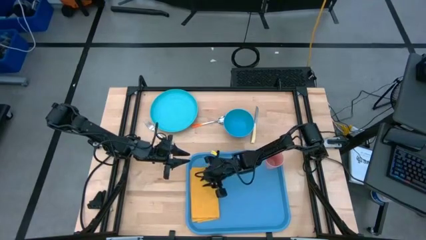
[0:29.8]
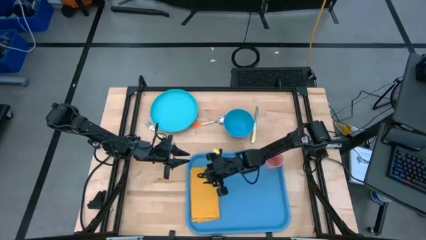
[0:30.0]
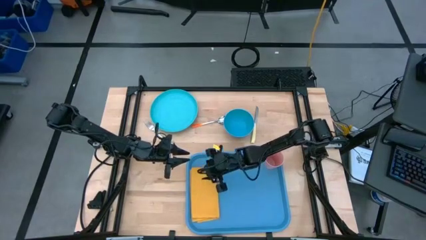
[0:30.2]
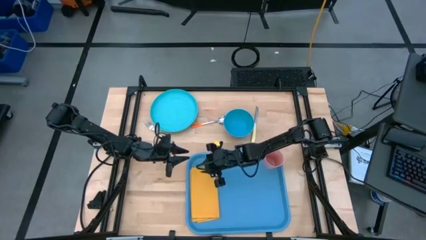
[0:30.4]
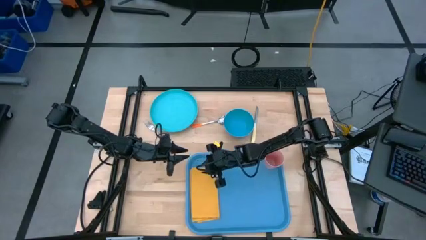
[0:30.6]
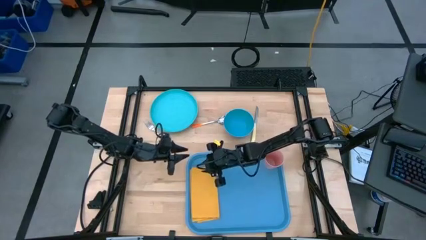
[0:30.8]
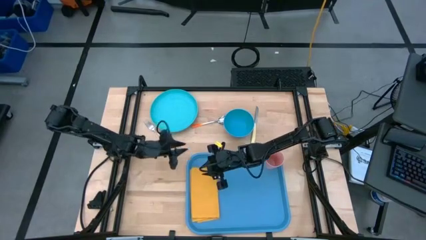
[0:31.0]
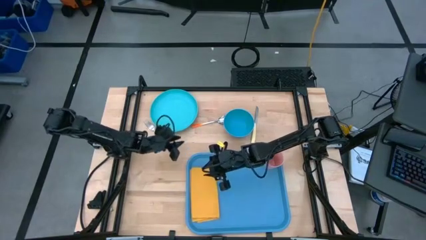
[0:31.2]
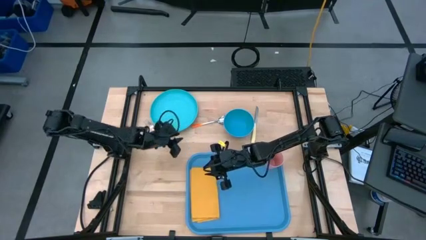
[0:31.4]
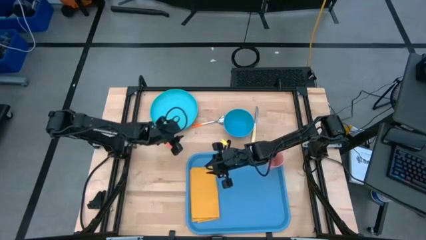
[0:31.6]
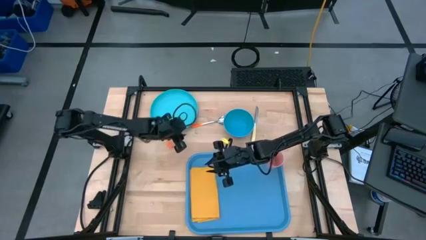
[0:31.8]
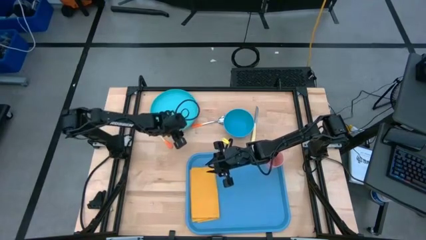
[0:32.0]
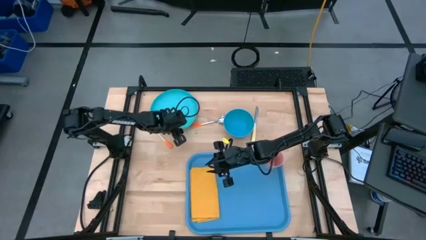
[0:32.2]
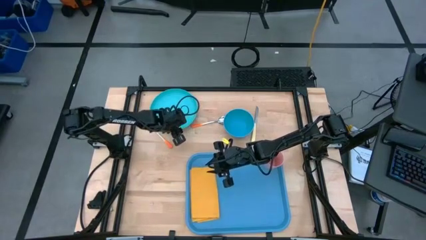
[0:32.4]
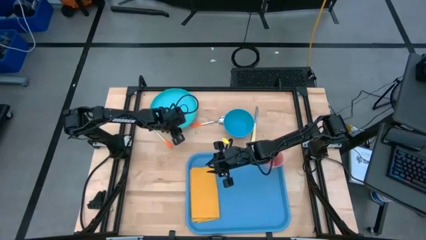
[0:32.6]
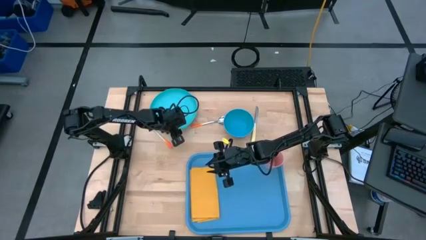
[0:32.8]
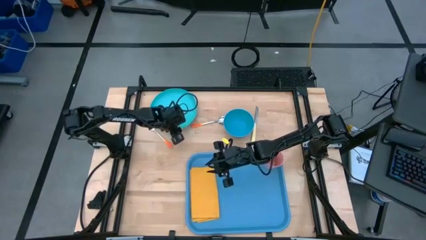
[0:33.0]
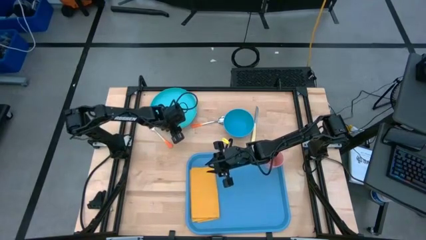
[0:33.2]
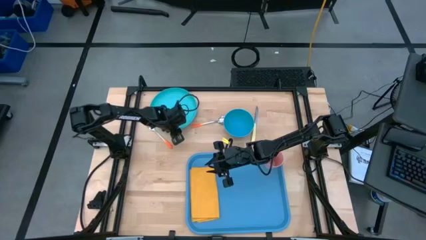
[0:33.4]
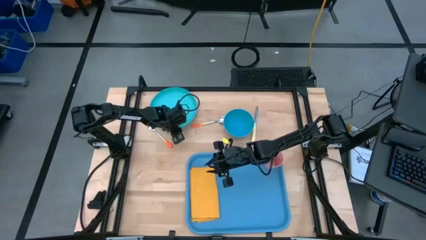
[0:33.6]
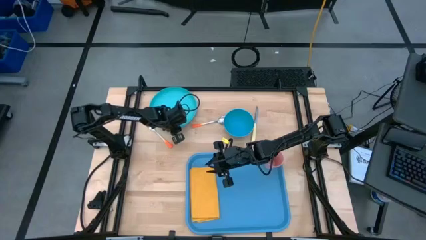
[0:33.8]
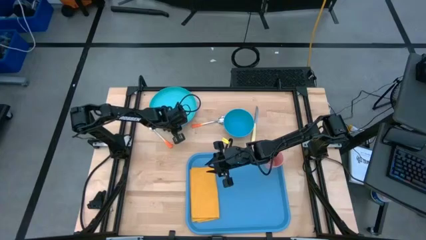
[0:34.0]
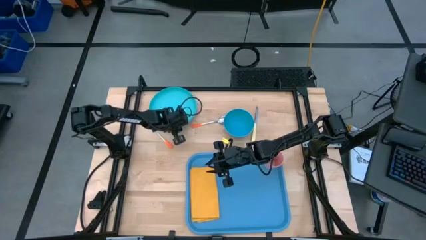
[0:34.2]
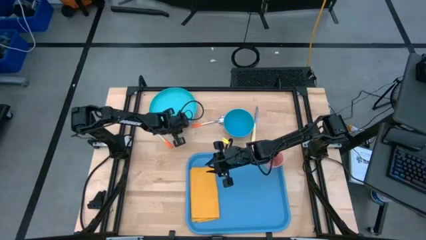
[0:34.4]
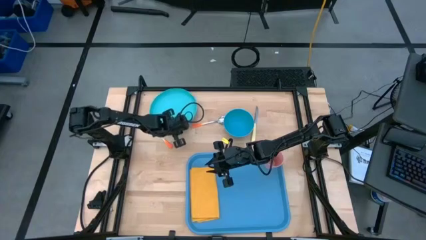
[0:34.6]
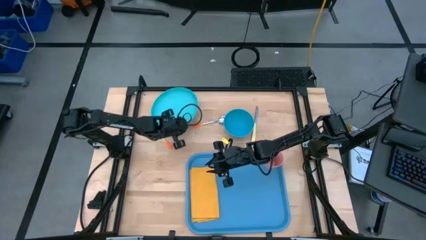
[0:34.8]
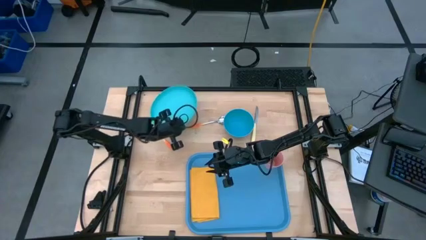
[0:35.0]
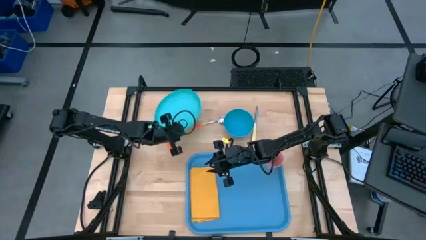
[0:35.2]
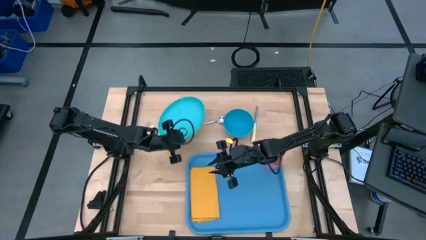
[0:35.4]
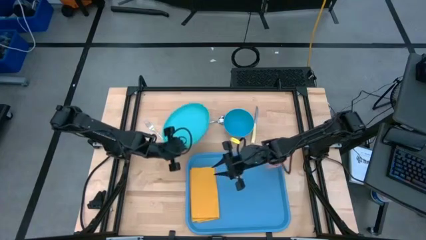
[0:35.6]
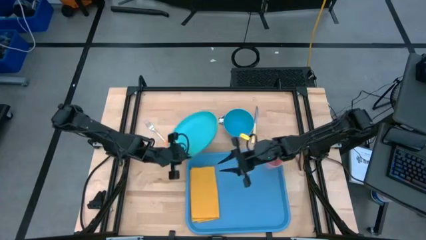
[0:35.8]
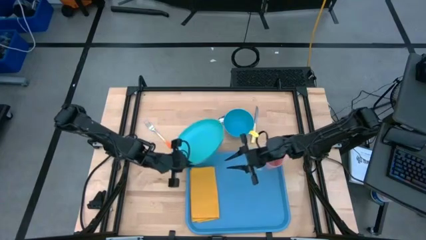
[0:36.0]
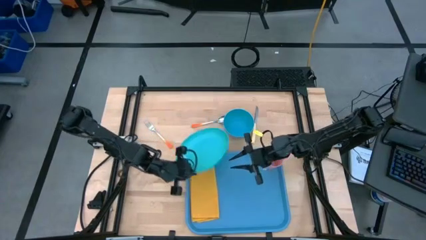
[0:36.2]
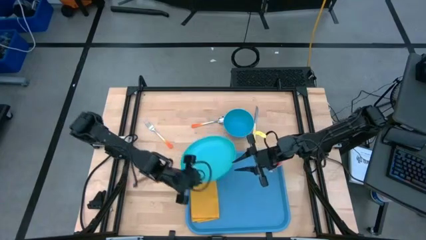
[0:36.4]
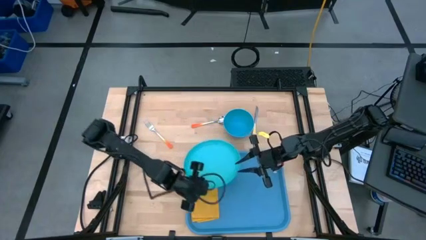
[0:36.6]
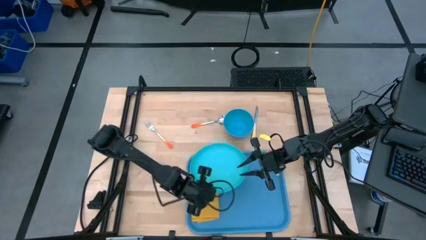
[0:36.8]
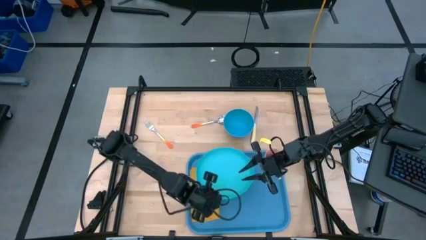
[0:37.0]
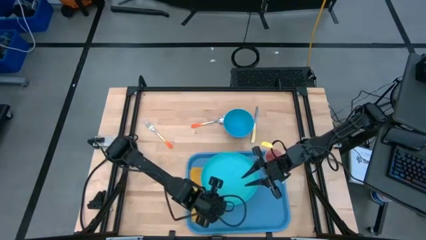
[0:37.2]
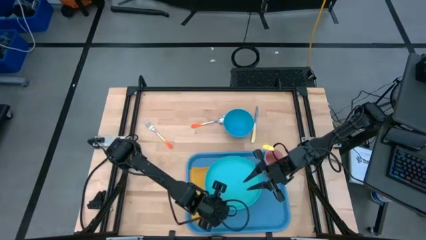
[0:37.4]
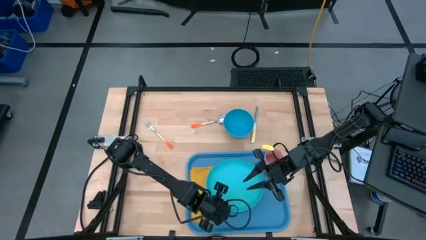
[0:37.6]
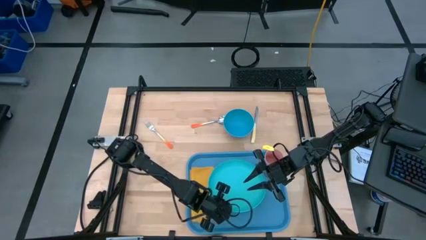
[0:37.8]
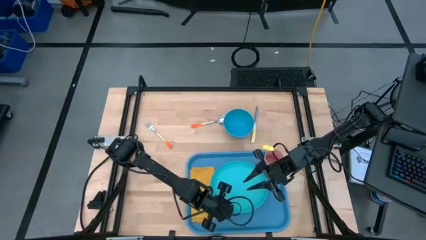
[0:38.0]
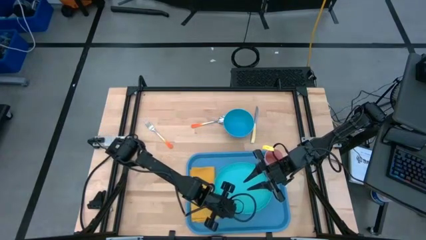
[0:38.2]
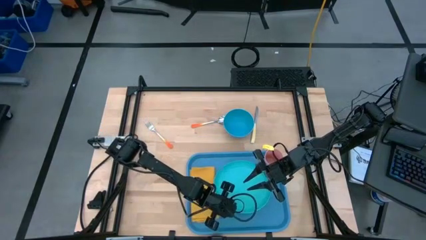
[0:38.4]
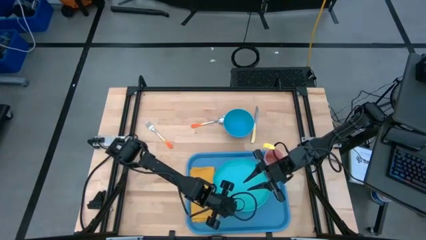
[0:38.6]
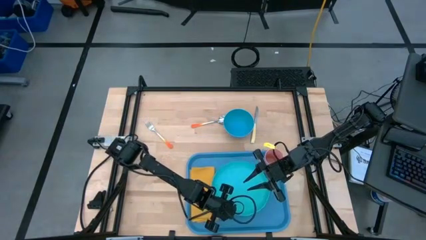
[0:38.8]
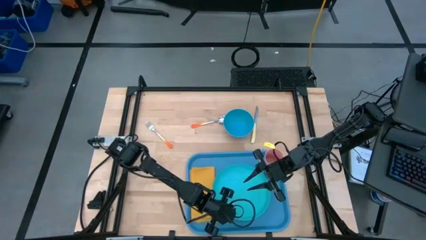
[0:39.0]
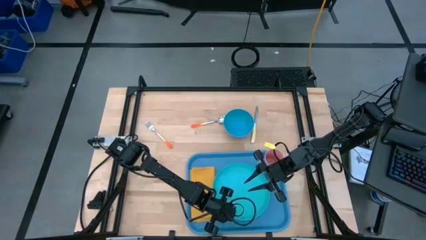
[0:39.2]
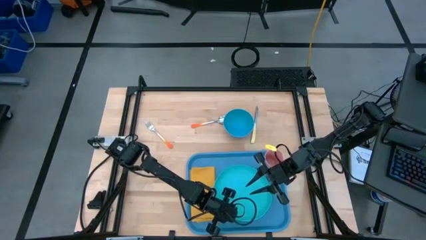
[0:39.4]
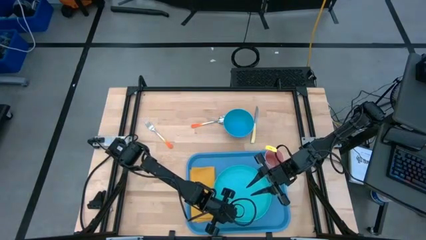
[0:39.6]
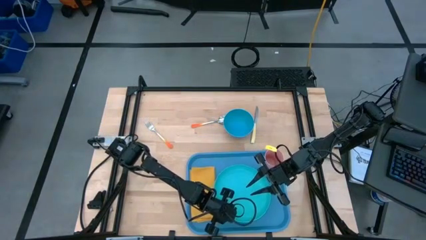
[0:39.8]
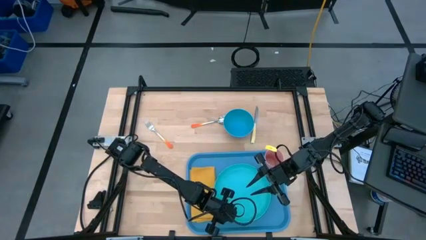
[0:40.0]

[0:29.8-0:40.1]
Task: Set up tray
Put the light blue plate on the blue serving tray to the right of the orange table napkin

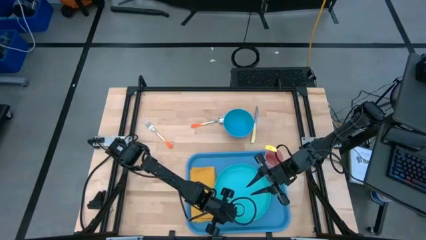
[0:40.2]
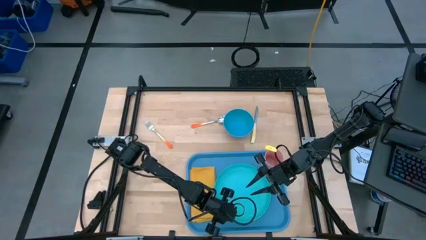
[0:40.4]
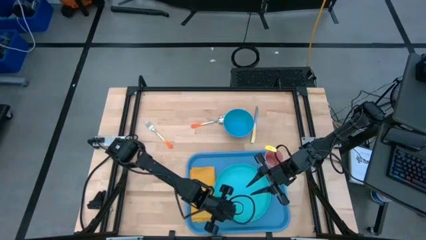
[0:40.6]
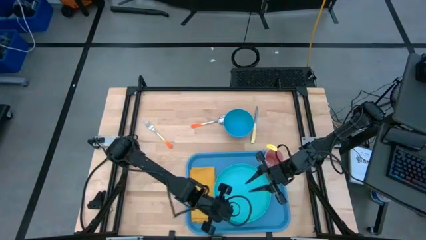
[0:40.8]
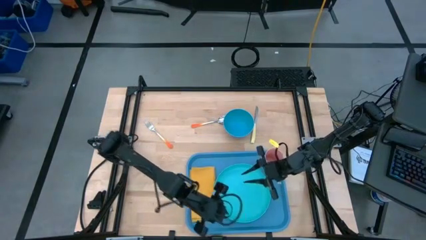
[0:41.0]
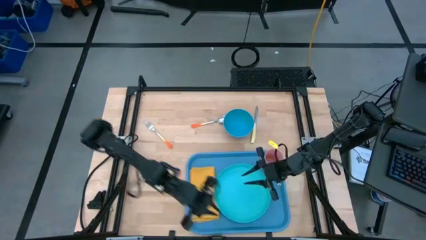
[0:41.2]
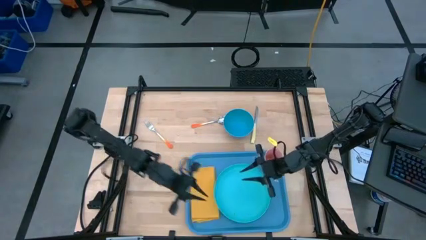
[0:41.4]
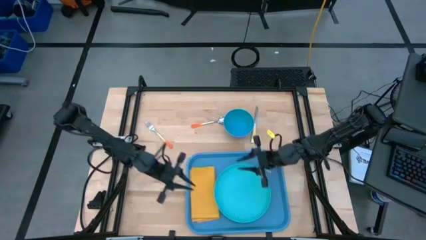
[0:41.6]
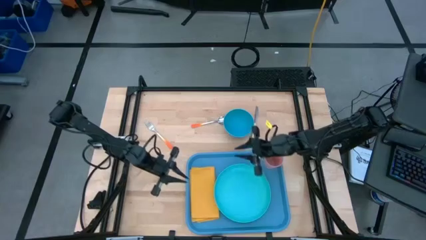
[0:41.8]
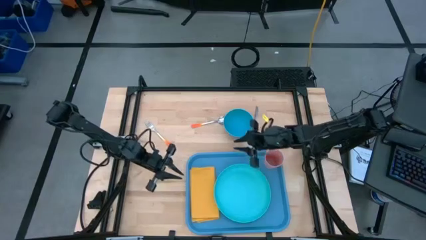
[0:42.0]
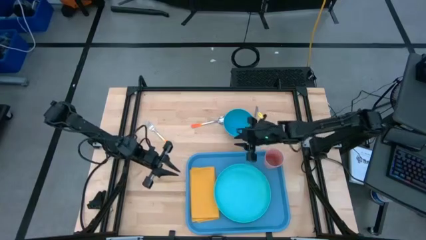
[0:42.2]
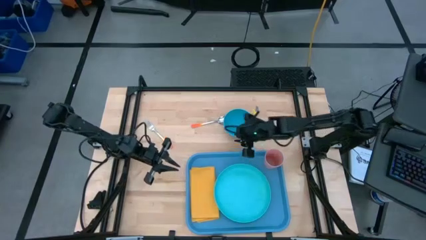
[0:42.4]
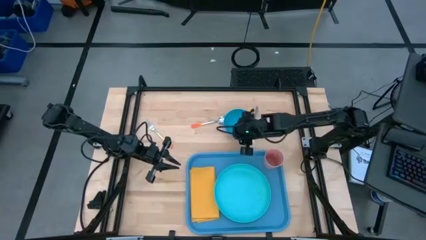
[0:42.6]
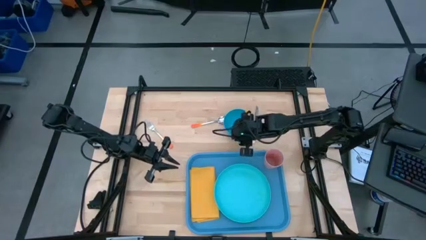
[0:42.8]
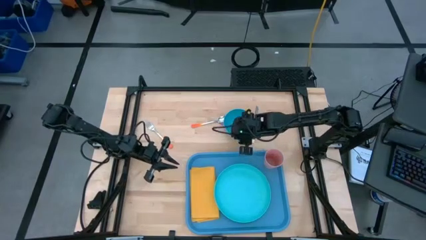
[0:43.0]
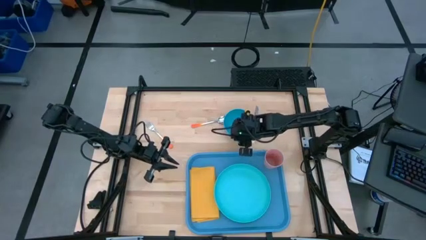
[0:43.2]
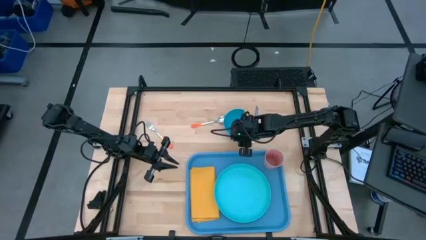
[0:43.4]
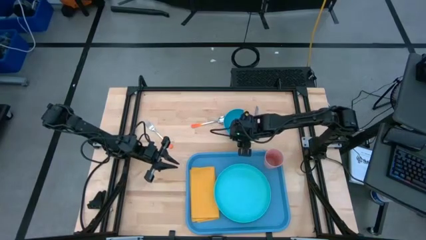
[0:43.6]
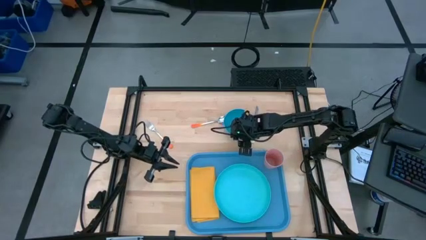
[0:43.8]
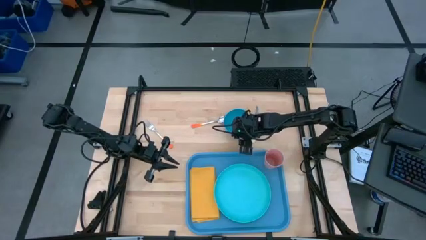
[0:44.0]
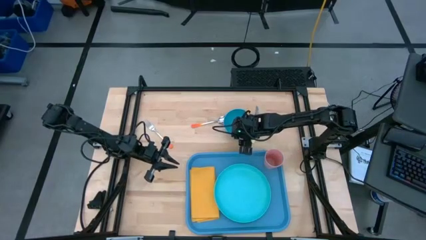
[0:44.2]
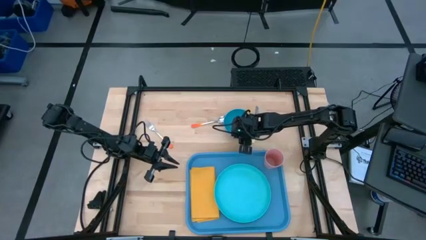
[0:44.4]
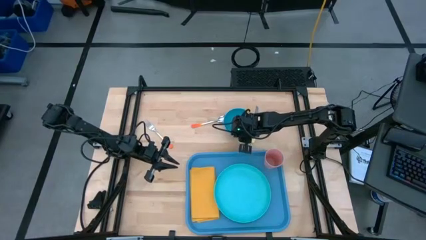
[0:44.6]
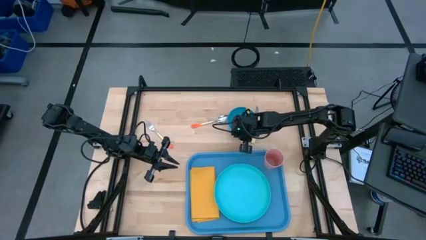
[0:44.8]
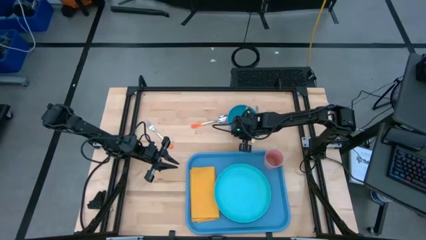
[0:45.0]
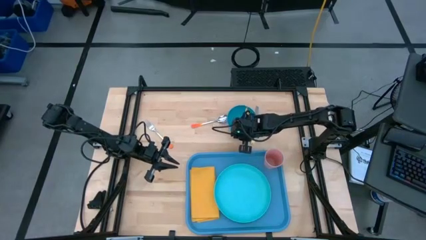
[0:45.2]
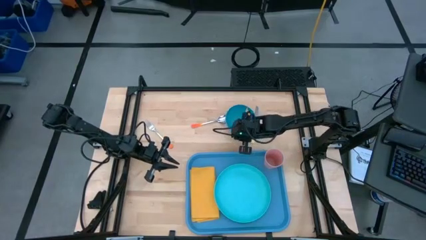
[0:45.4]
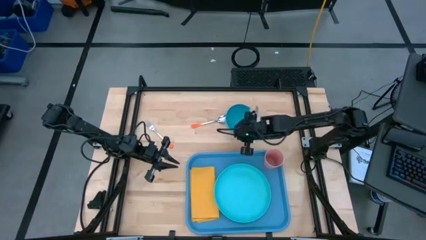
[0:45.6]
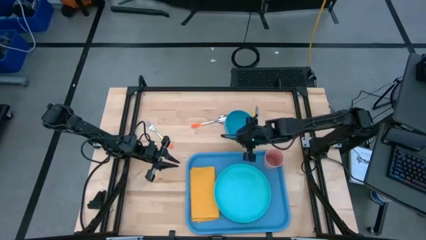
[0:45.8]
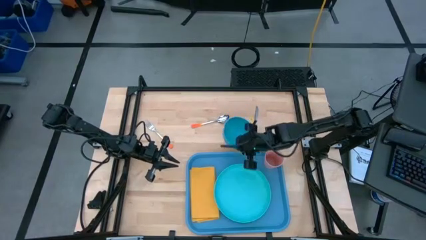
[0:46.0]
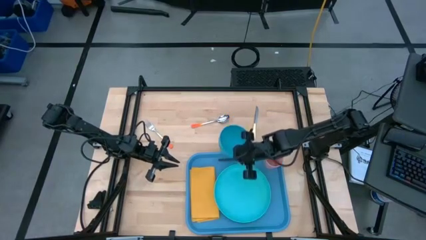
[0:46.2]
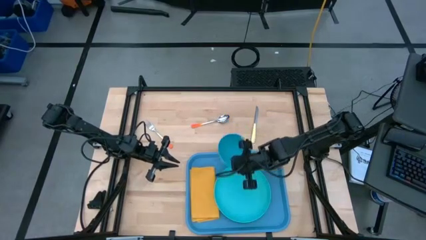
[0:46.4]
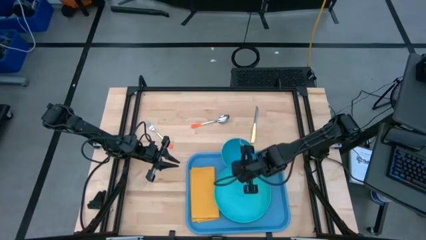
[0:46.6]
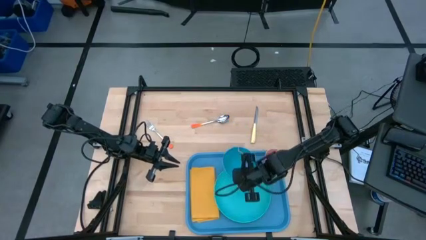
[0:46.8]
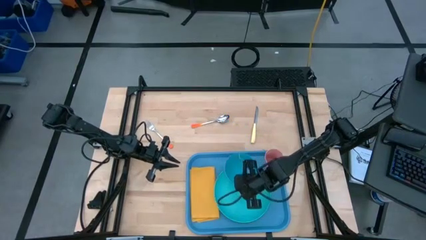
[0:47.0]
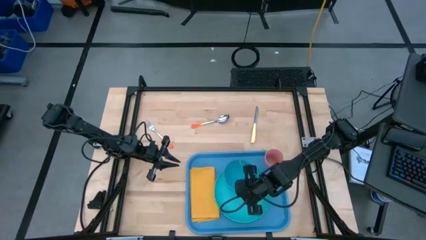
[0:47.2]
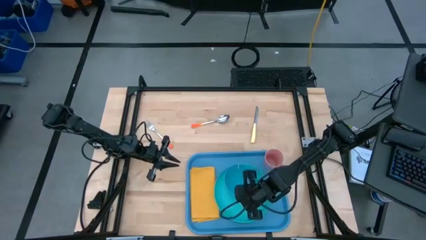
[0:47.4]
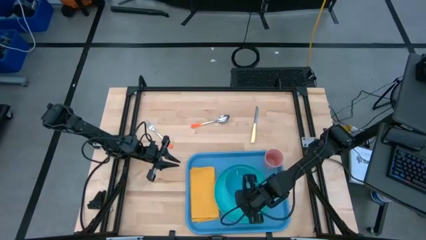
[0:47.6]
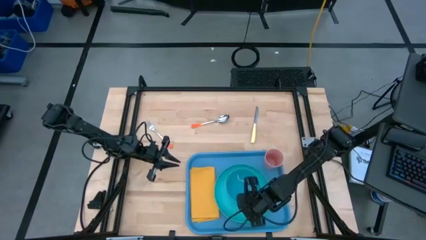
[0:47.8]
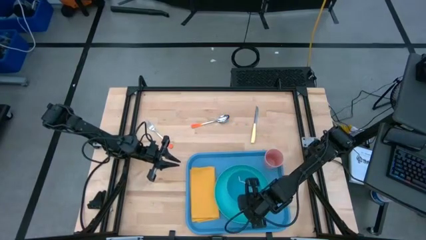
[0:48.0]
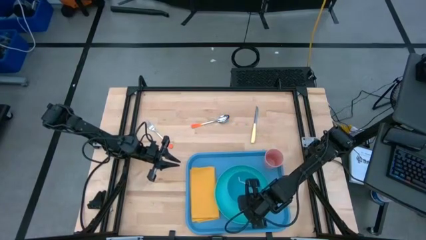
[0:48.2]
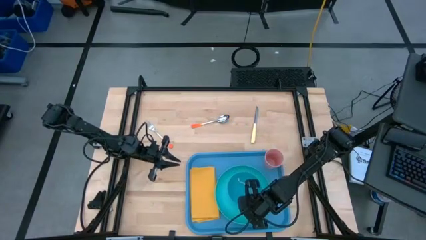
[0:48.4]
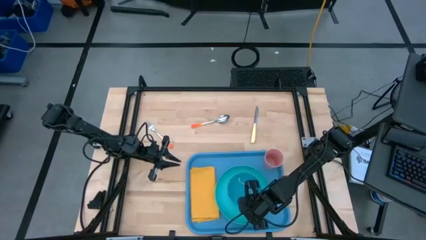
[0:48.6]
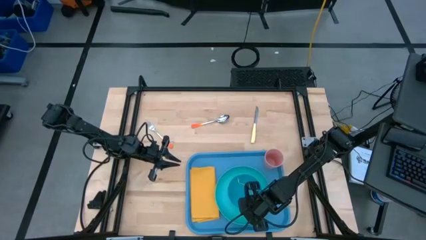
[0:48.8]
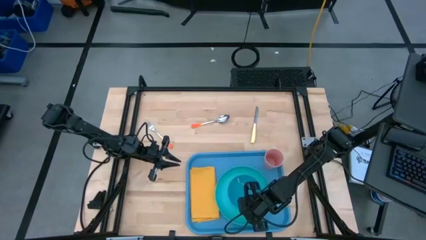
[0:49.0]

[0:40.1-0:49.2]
Put the blue bowl on the light blue plate
